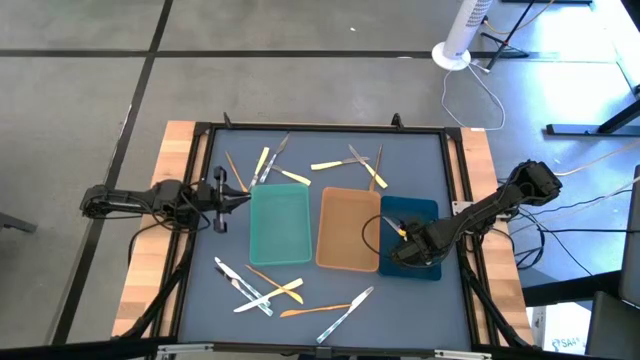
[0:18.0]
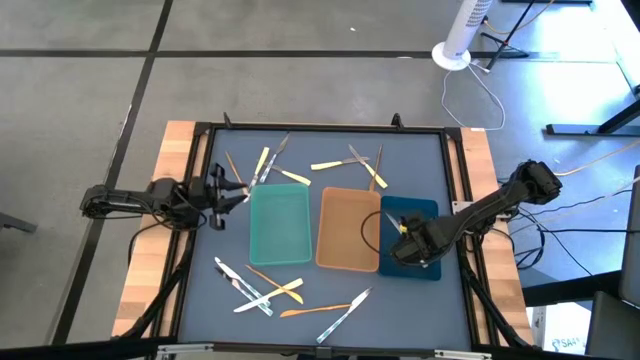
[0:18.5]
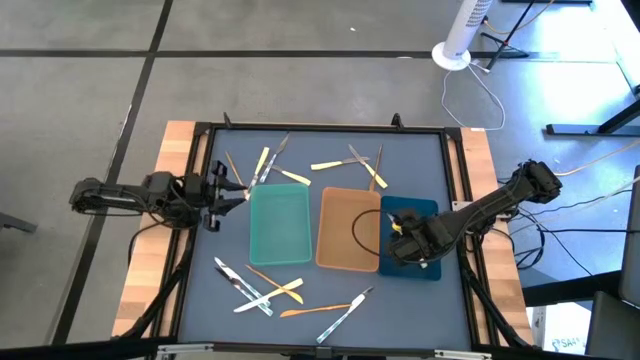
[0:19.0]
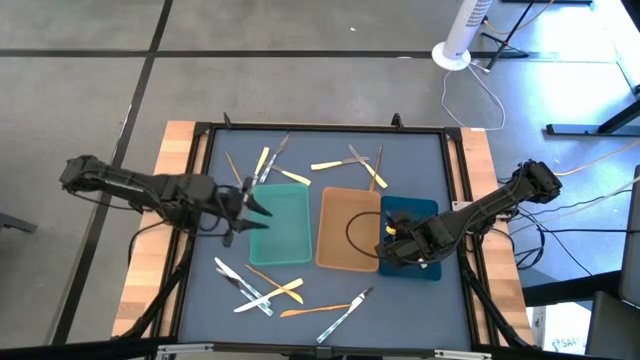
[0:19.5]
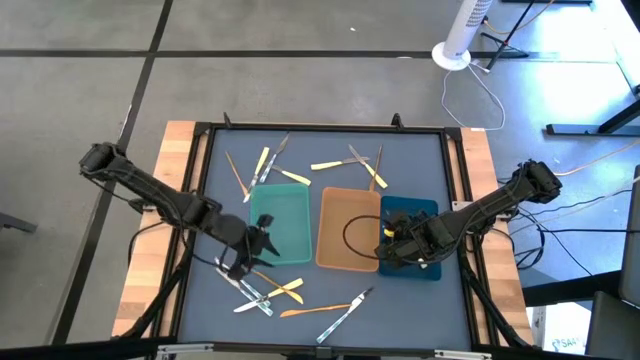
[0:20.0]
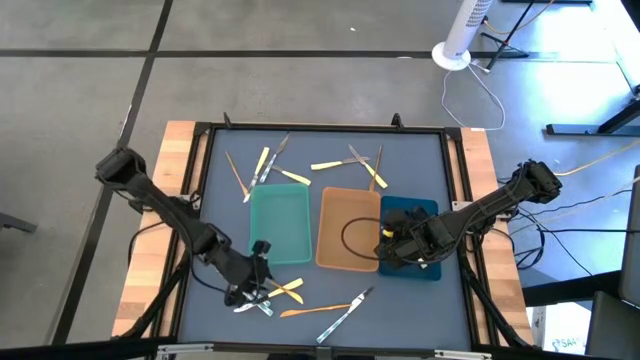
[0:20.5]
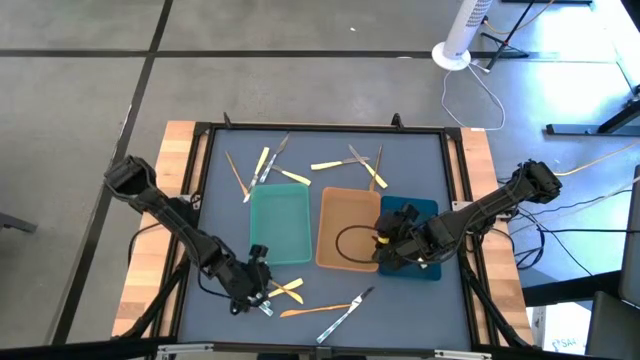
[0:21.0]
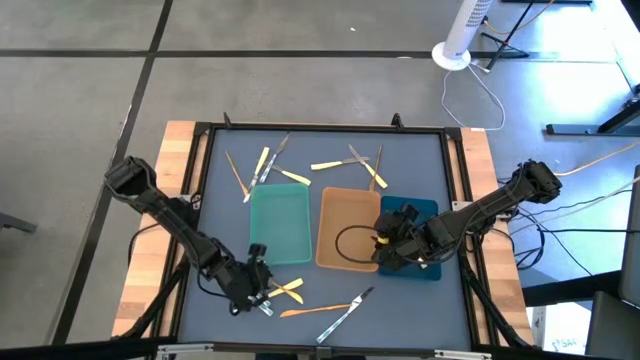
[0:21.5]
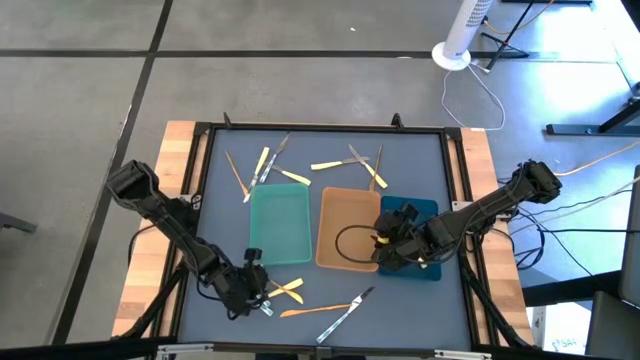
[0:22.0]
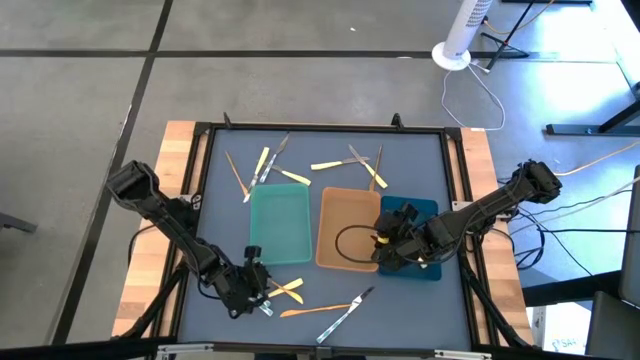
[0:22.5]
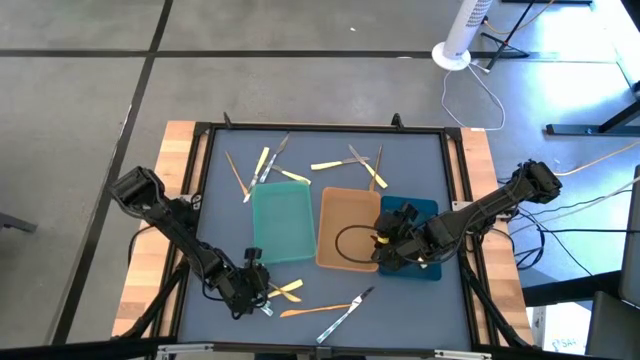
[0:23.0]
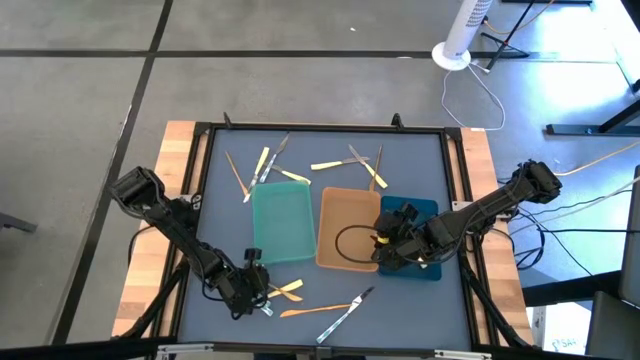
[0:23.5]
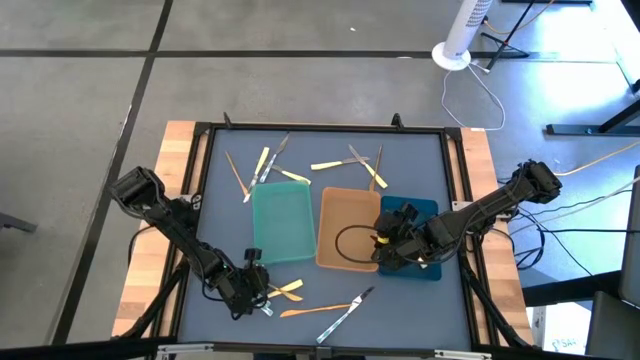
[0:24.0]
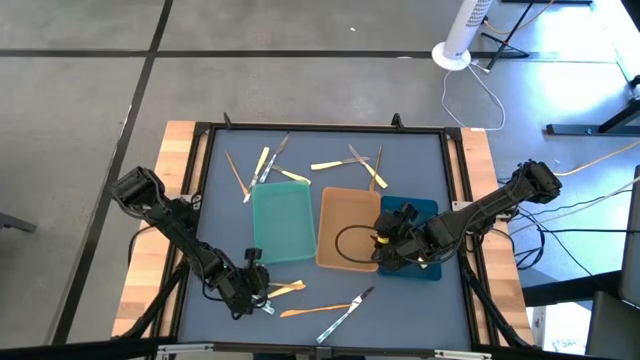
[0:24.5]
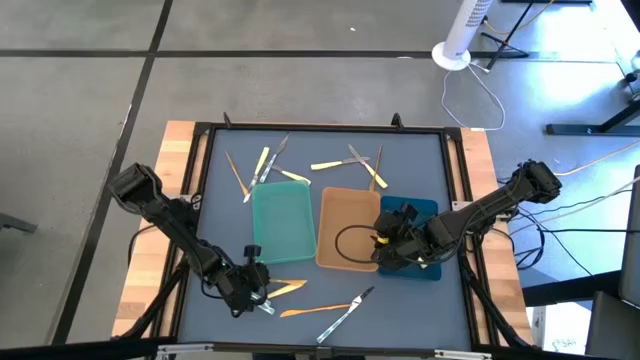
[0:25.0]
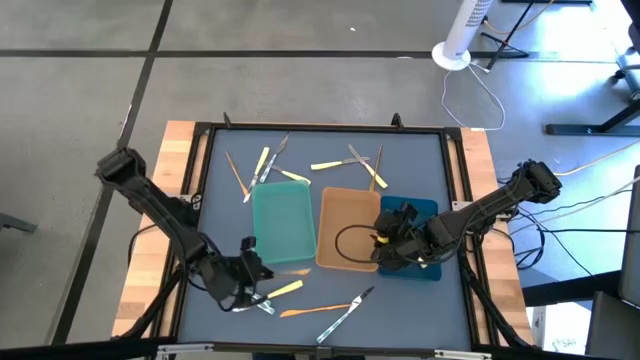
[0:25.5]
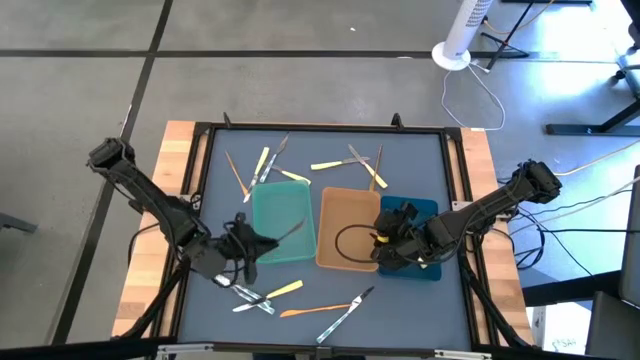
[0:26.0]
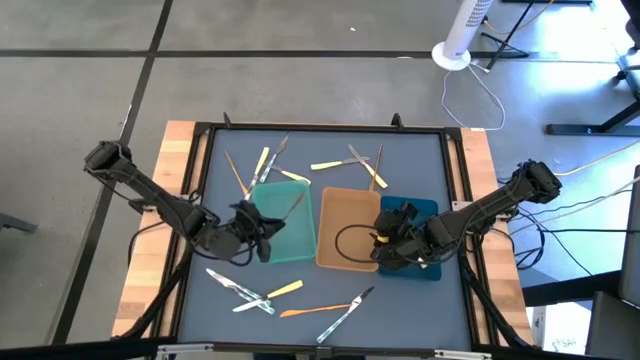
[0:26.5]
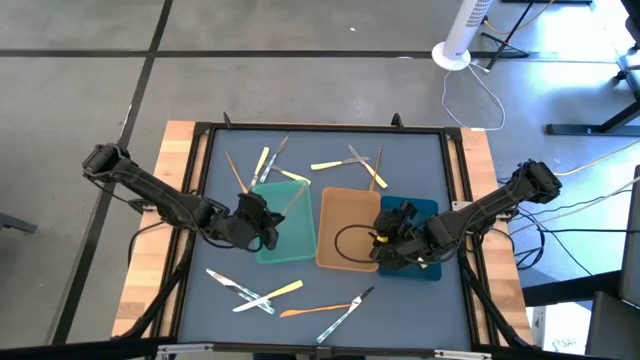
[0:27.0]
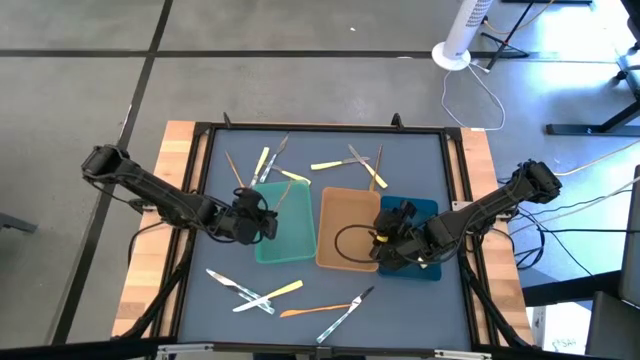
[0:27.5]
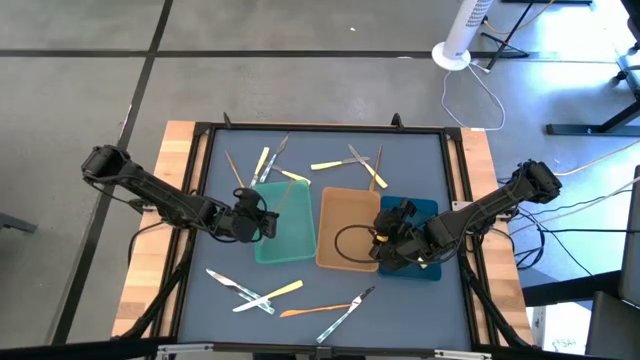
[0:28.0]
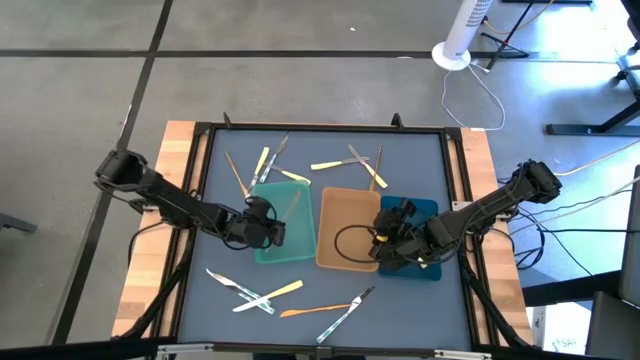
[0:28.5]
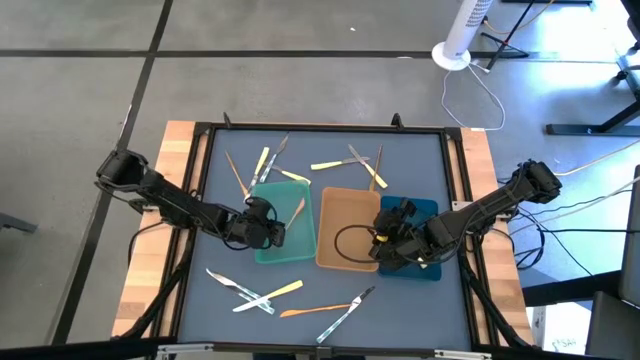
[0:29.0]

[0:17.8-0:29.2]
Task: Sort silverware by color (type)
Put the gold knife into the green bin

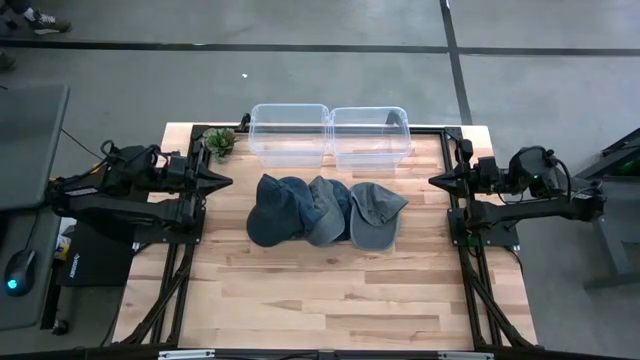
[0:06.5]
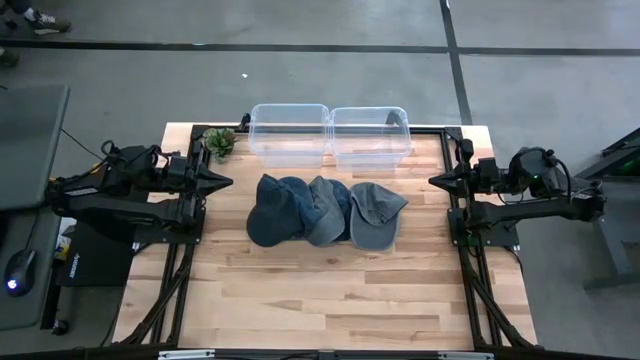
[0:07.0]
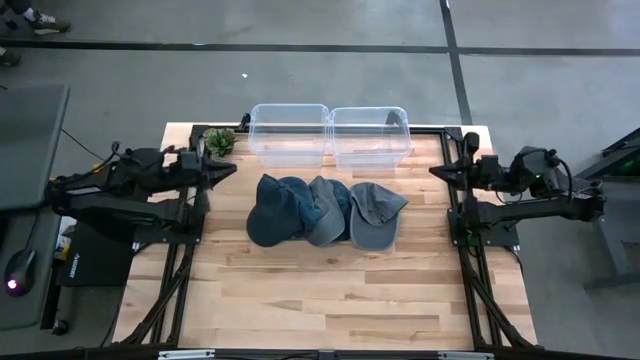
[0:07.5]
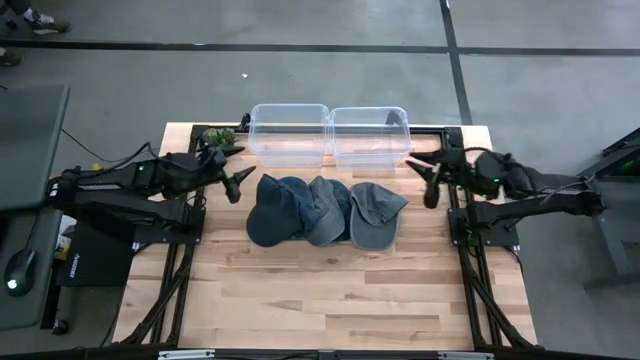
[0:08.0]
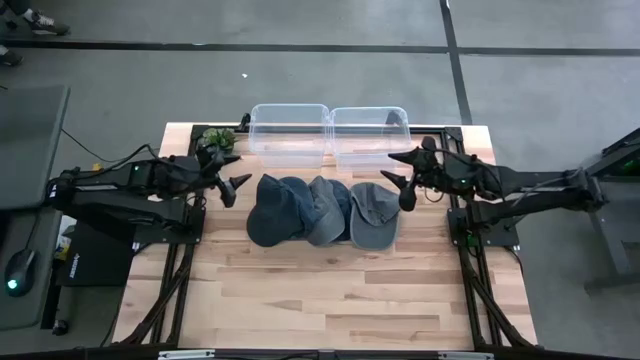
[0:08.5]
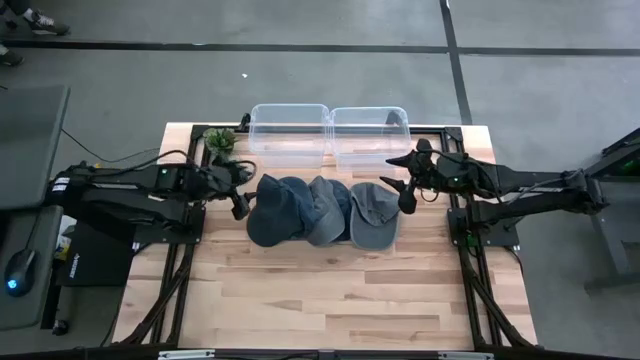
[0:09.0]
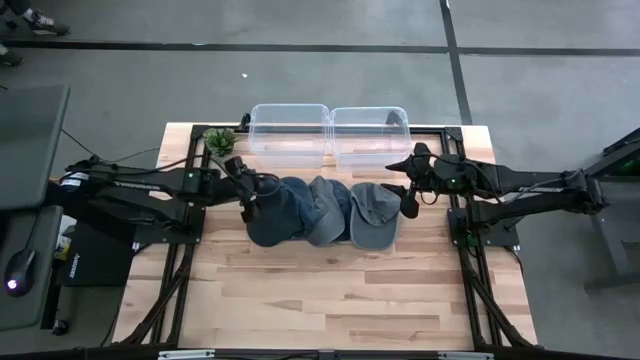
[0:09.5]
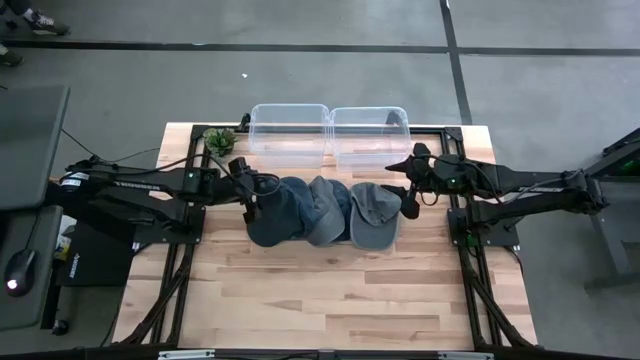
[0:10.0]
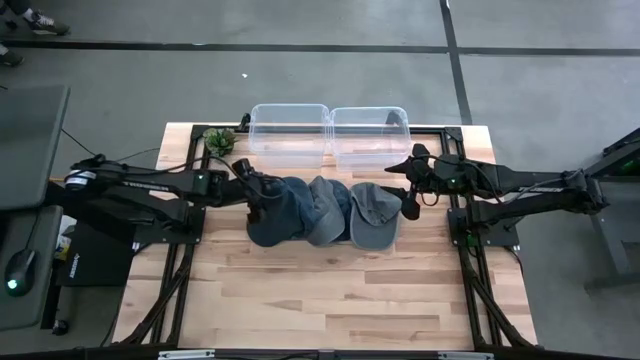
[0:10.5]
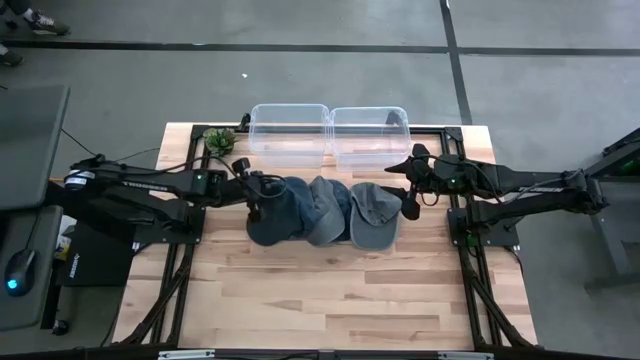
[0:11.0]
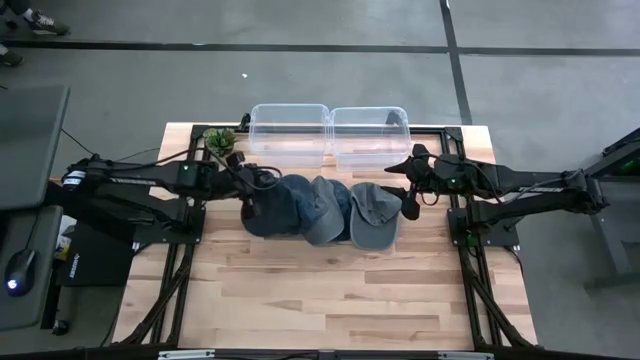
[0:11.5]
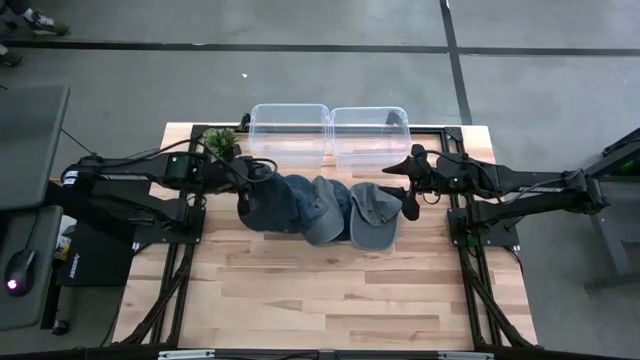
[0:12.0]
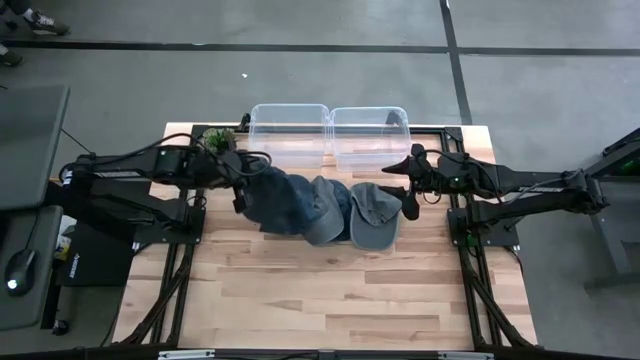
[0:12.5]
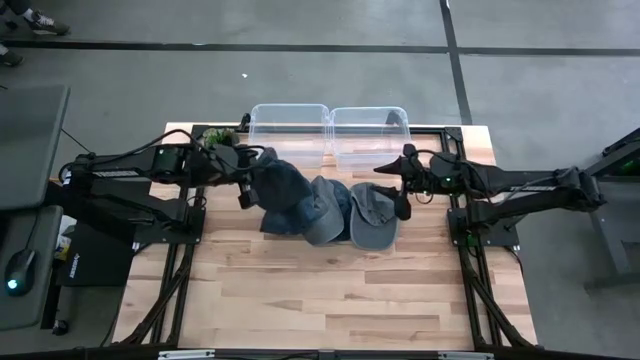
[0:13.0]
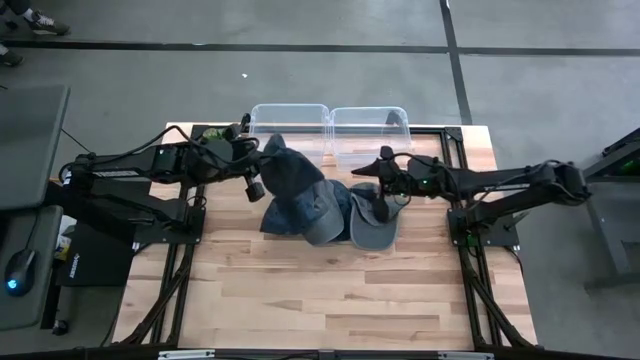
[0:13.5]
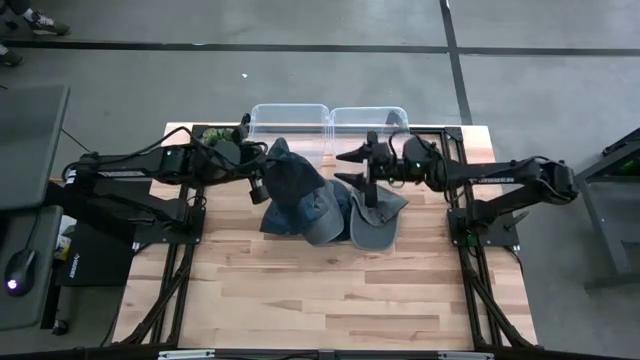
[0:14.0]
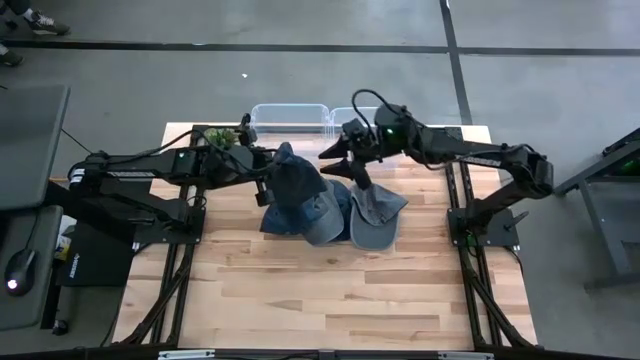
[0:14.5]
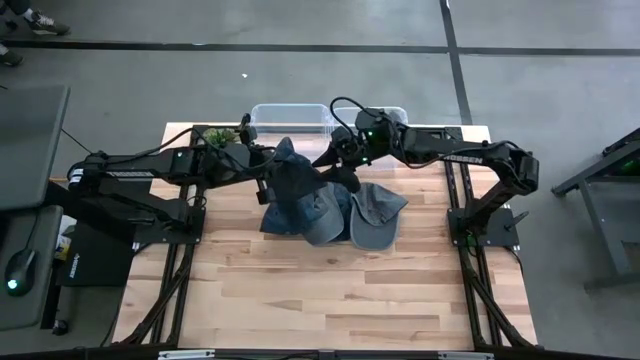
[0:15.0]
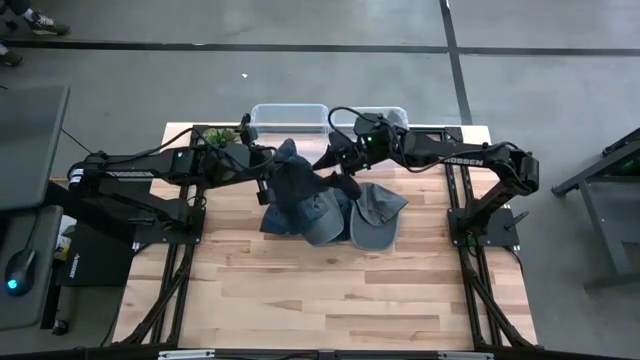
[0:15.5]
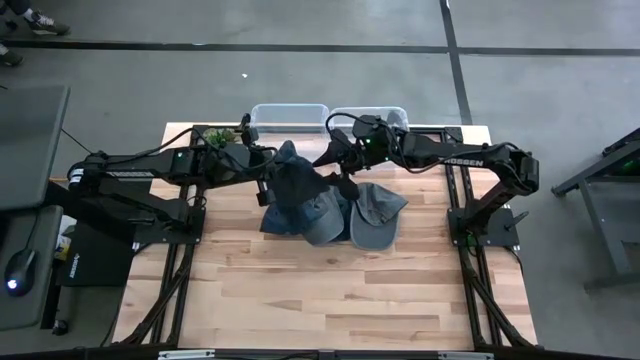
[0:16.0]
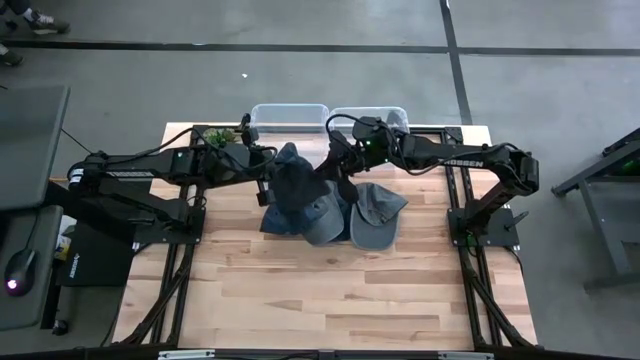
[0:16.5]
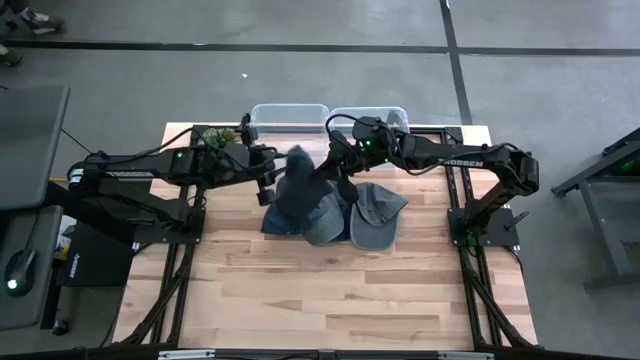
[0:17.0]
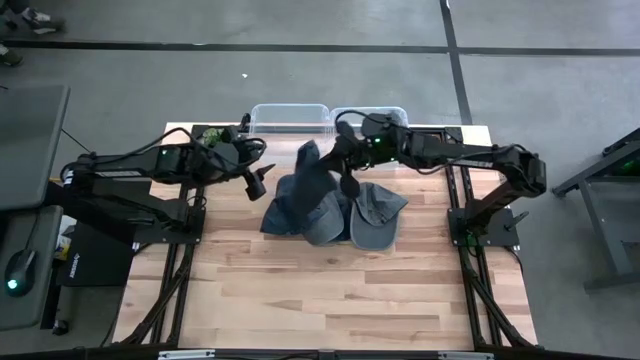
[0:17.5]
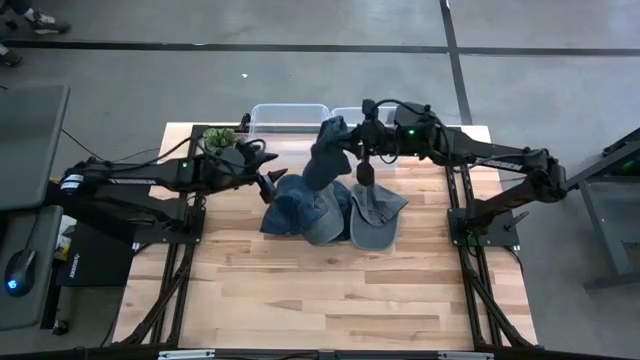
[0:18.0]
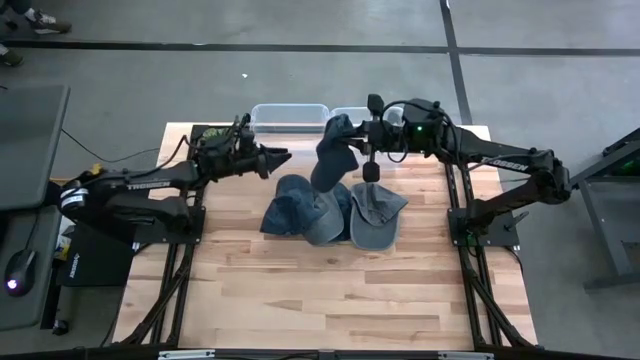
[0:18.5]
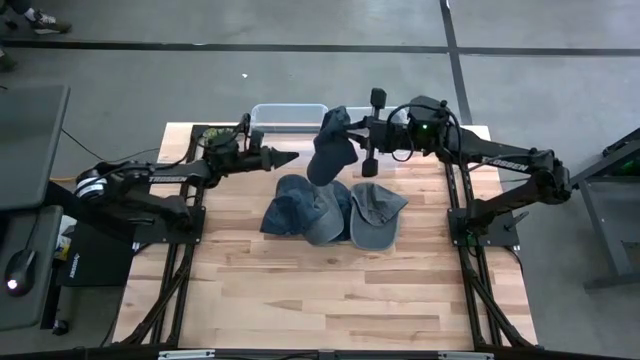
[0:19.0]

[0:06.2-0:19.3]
Task: Pick & Place hat
Put the left top blue cap into the left transparent bin
